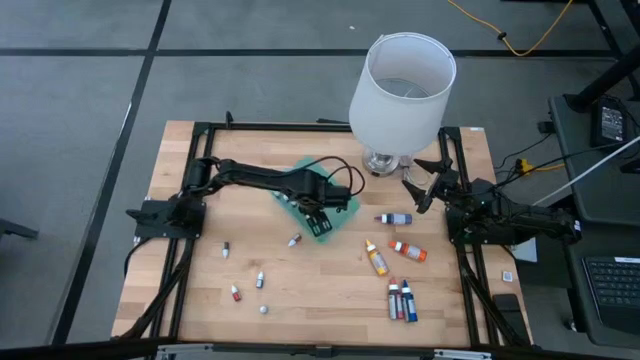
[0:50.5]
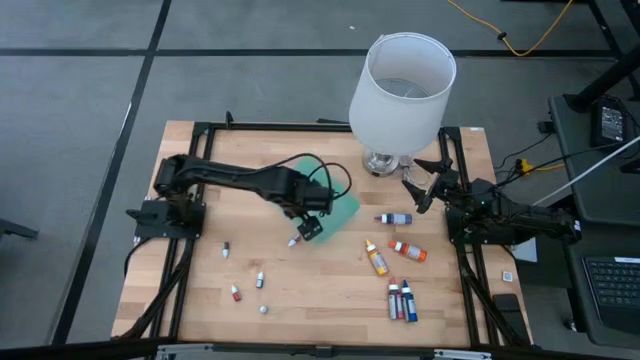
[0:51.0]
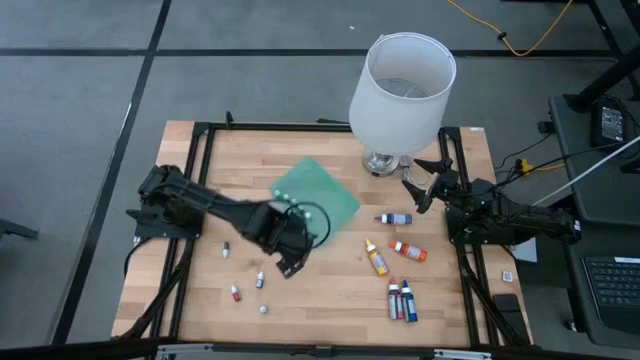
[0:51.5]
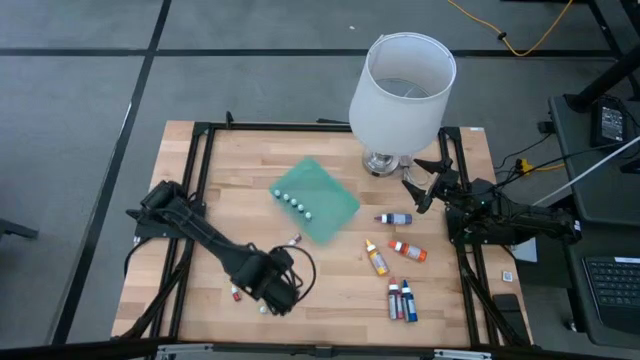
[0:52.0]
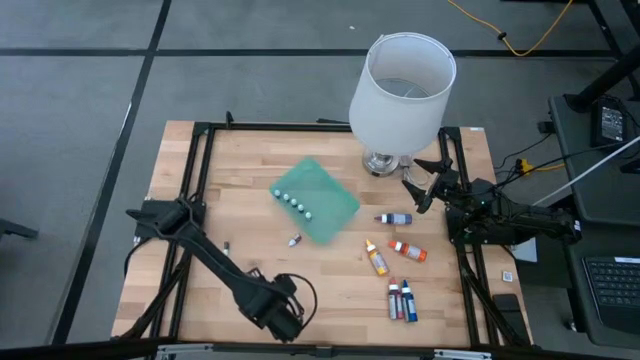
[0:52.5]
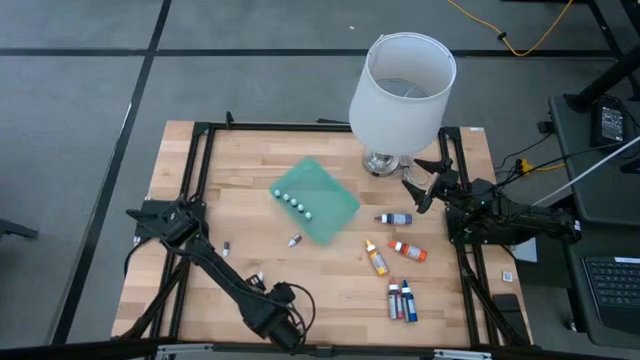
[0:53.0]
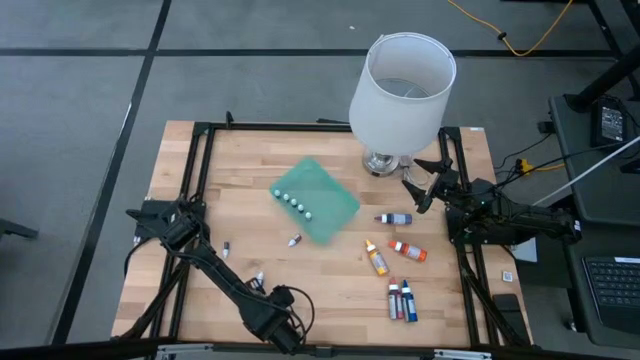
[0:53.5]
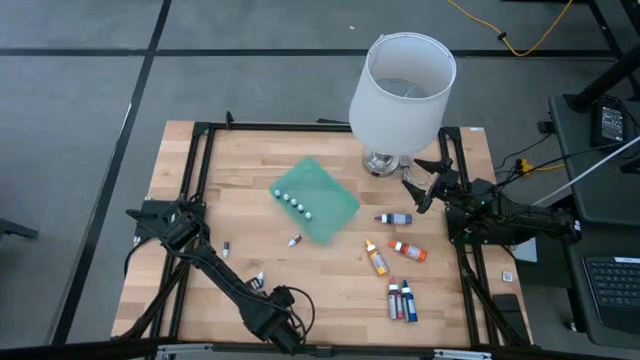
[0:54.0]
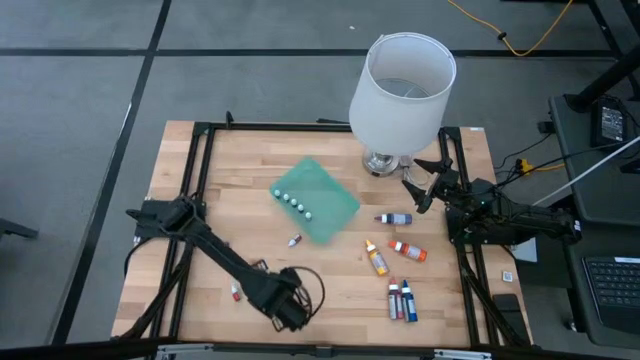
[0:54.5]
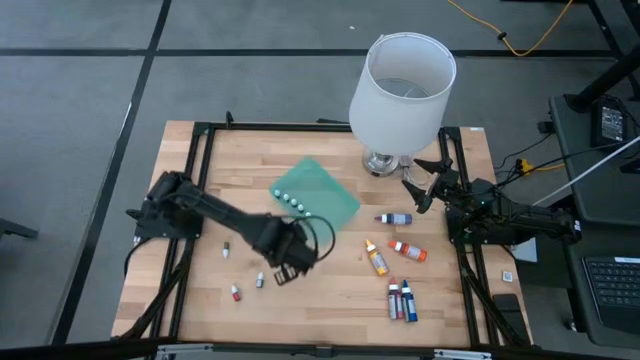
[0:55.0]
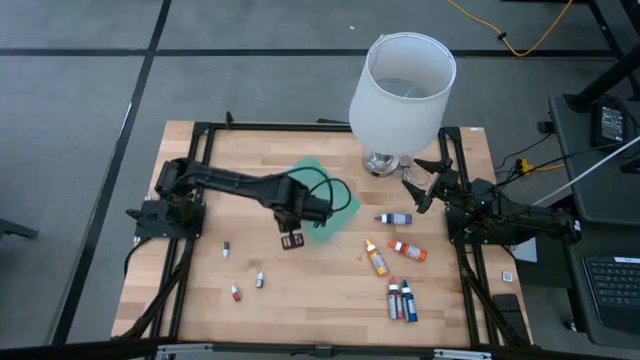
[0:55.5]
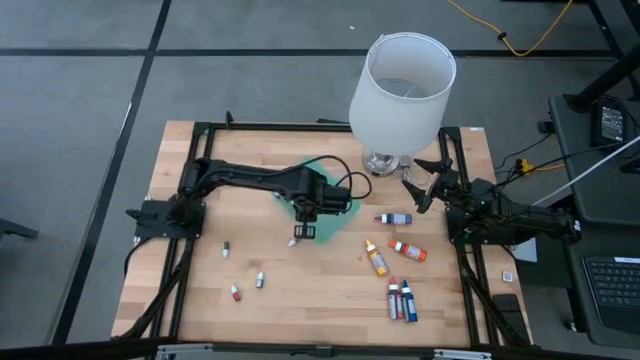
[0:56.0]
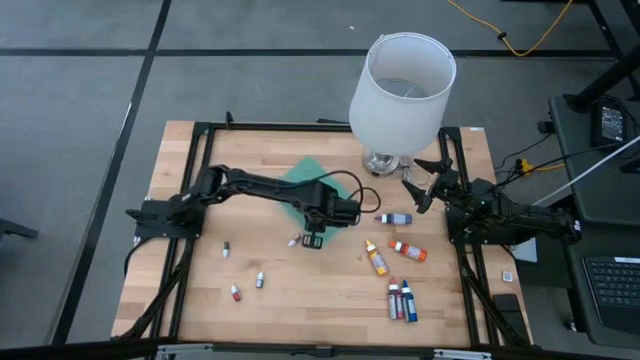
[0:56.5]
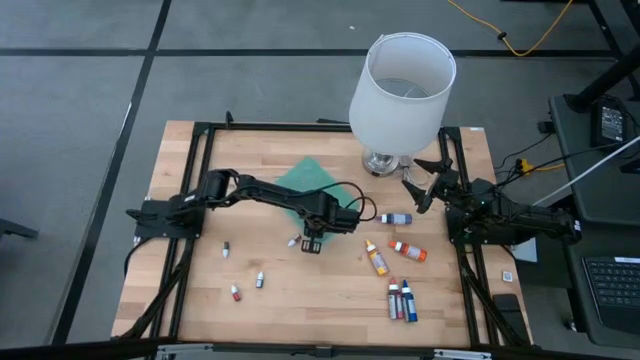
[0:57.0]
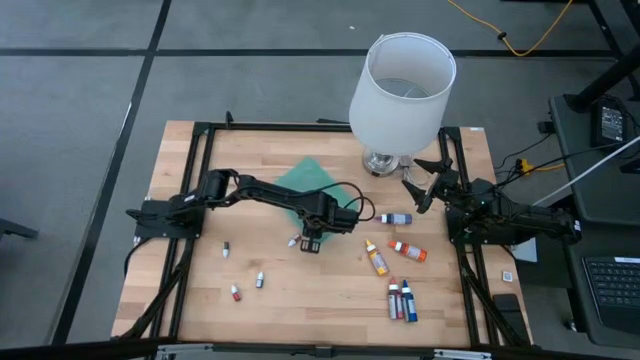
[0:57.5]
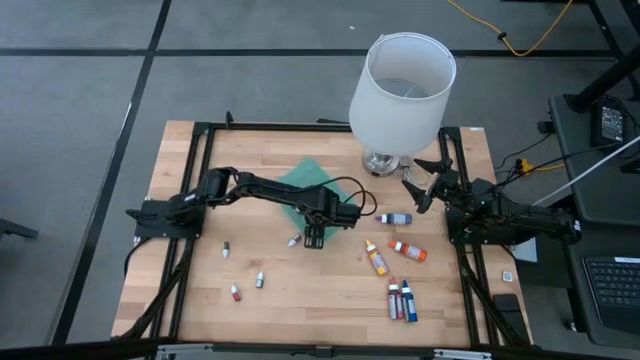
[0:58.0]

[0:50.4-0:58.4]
Task: Pick & Place food coloring
Put the small black food coloring bottle into the green bin

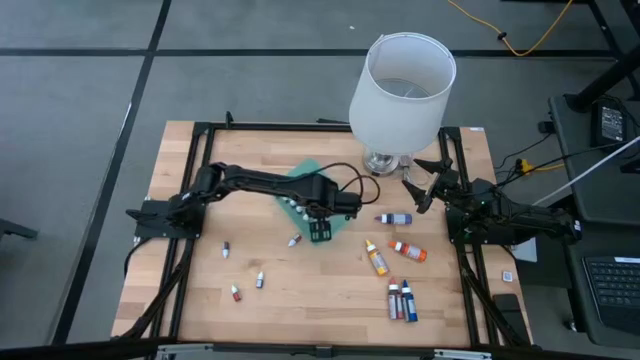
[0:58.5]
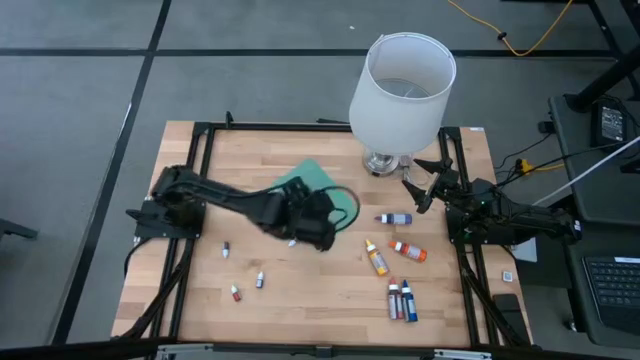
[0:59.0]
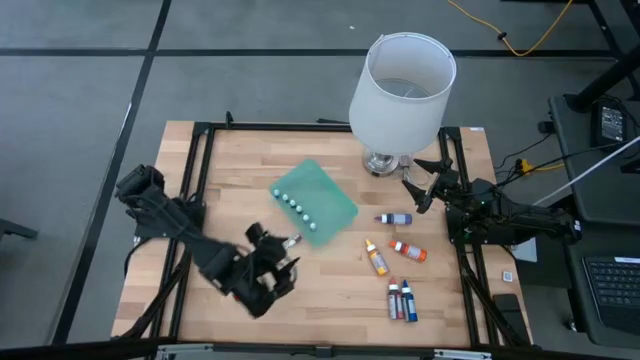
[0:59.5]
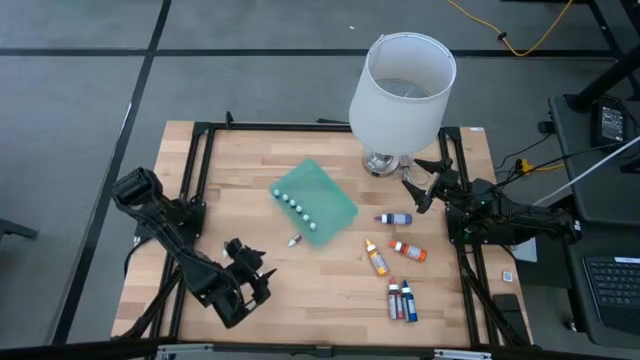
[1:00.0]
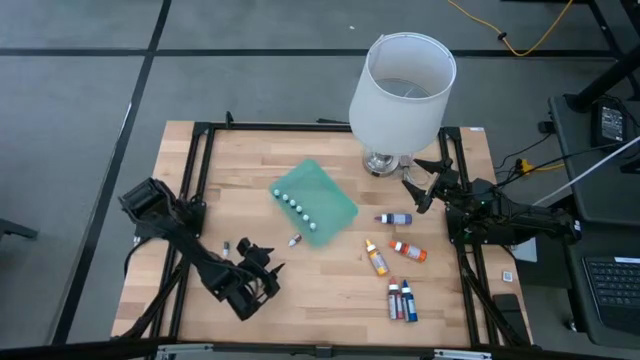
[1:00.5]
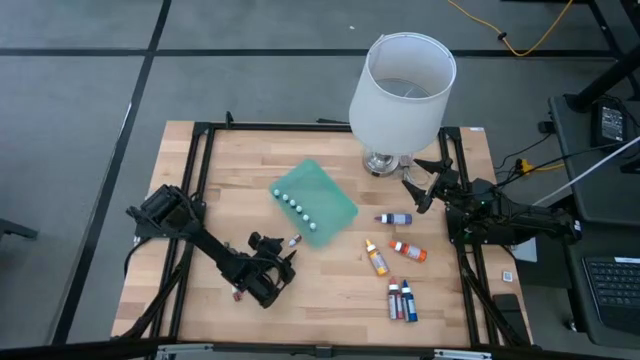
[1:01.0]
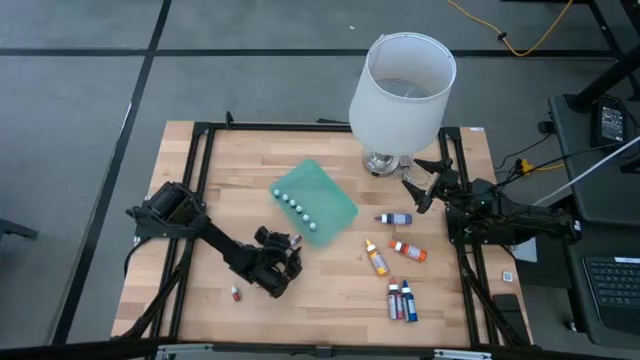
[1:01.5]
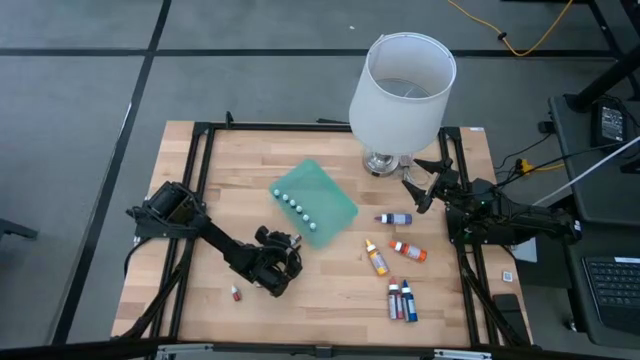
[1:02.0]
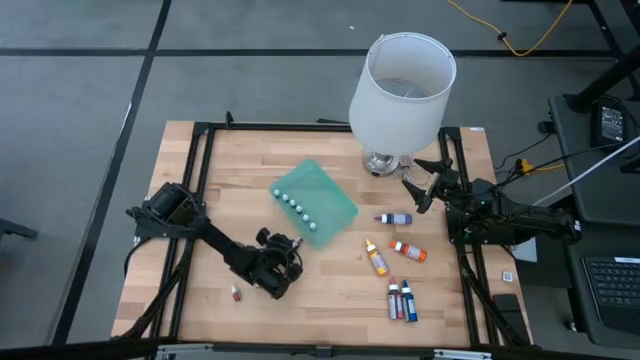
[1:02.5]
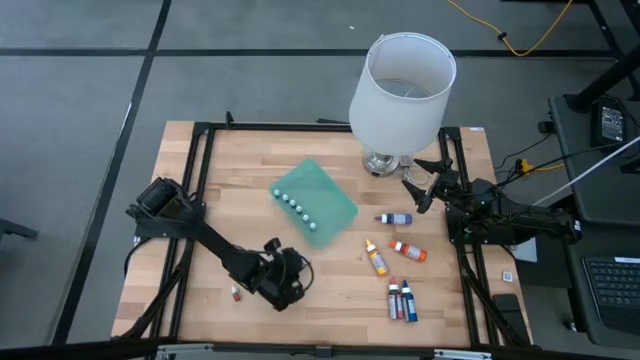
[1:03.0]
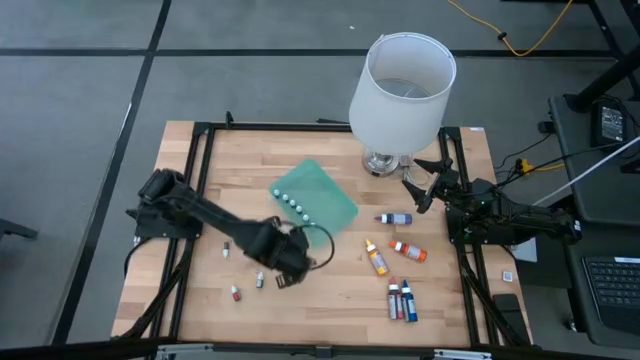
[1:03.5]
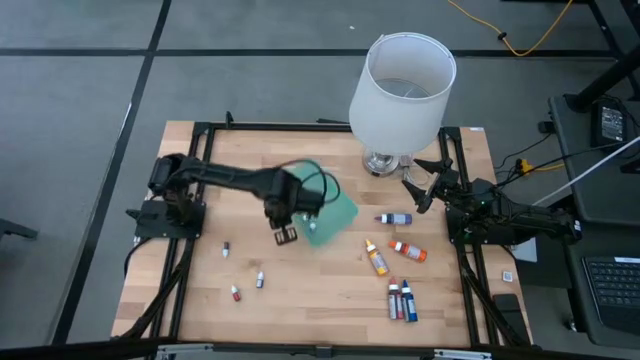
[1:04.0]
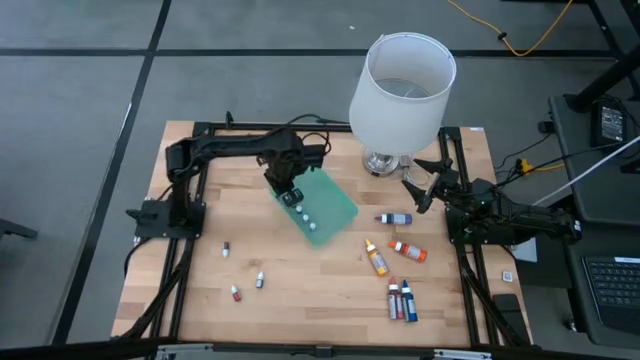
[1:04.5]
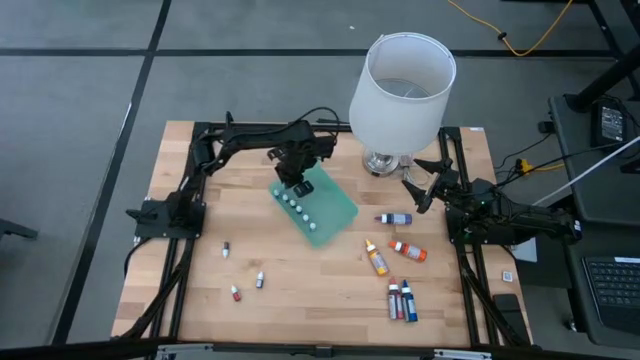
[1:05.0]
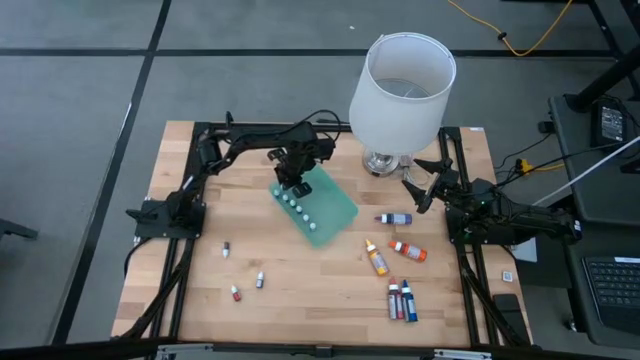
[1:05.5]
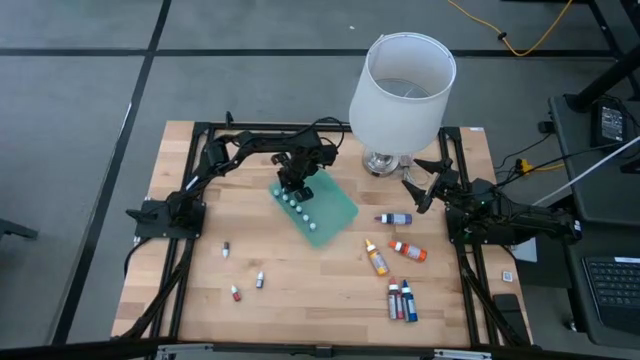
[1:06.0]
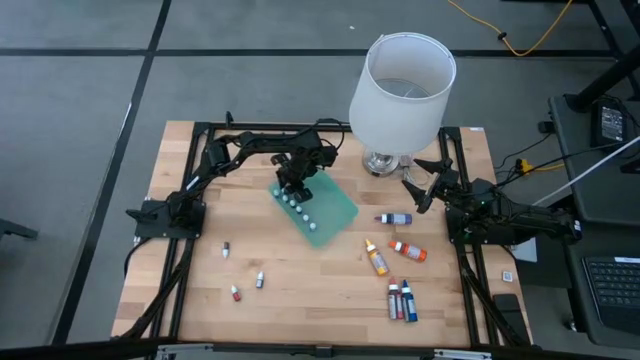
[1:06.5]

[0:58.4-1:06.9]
Put the top right small red food coloring bottle into the green bin

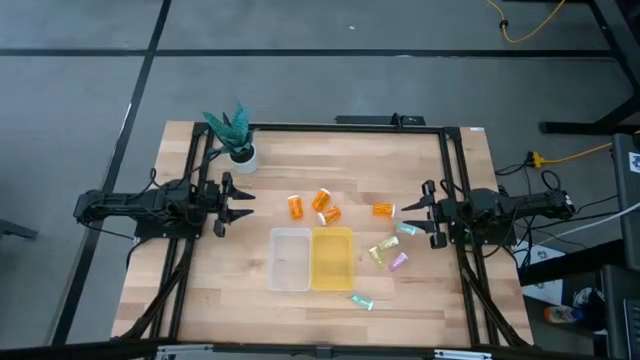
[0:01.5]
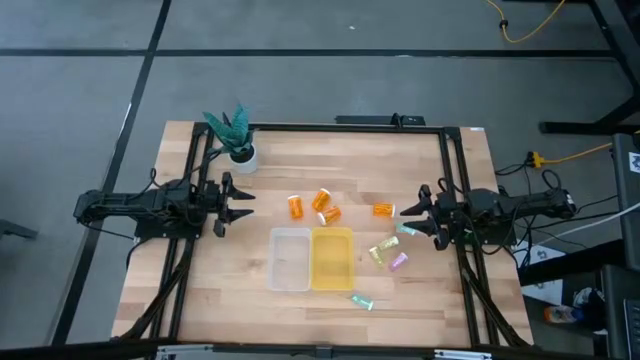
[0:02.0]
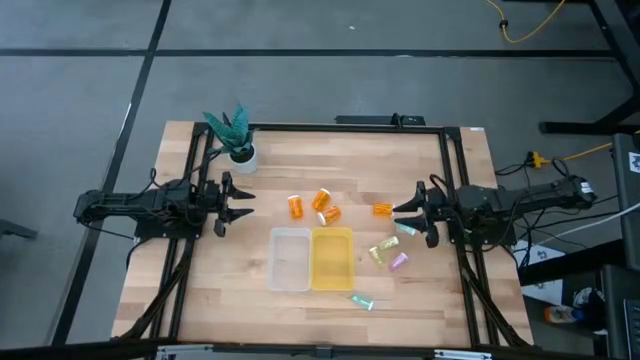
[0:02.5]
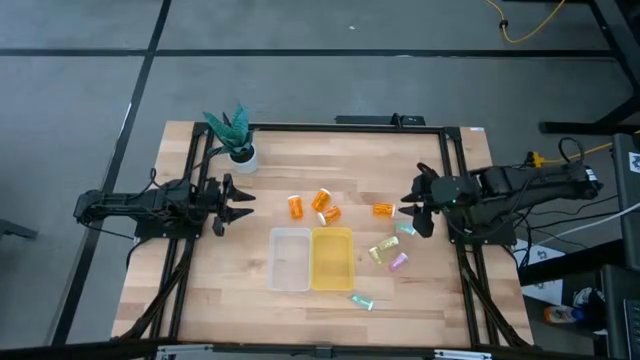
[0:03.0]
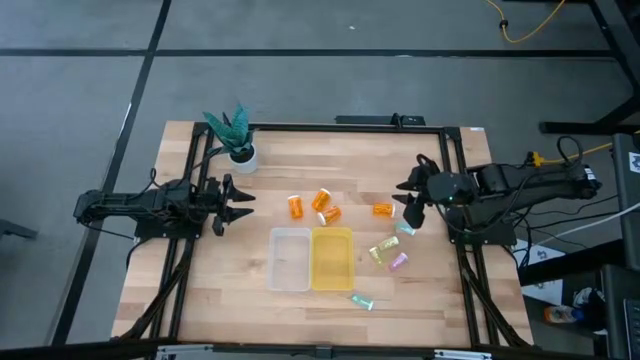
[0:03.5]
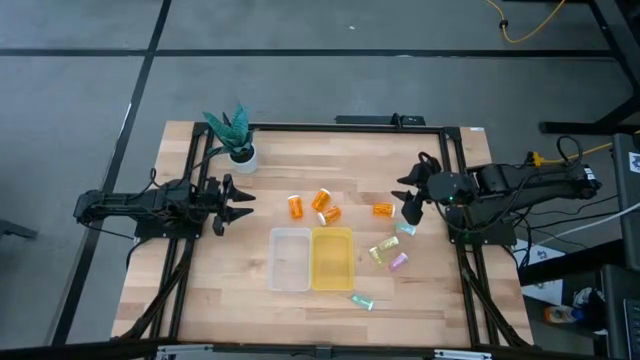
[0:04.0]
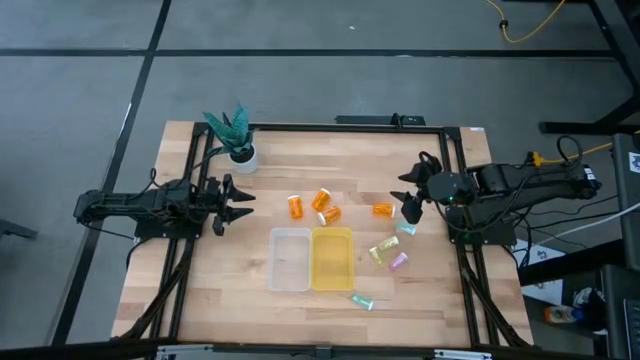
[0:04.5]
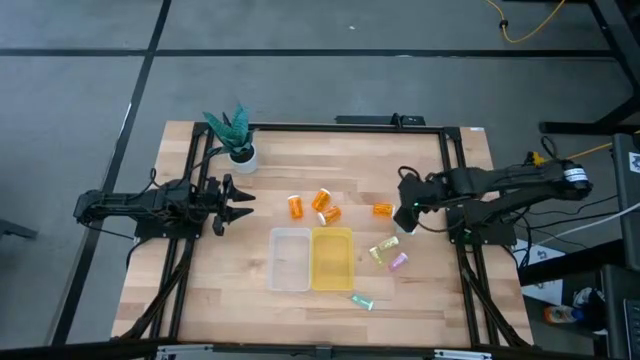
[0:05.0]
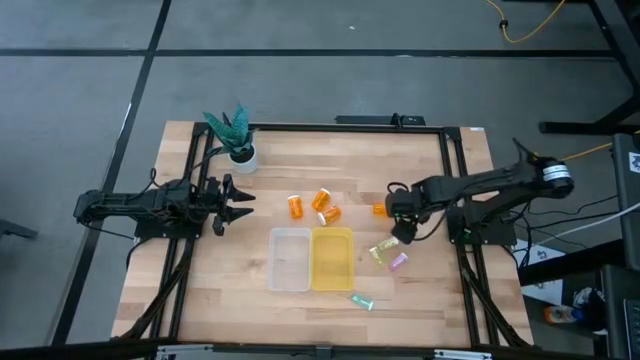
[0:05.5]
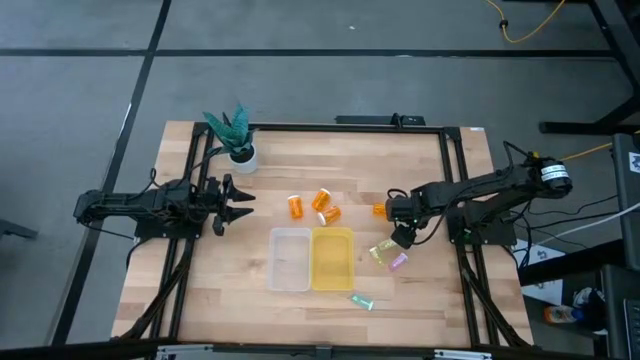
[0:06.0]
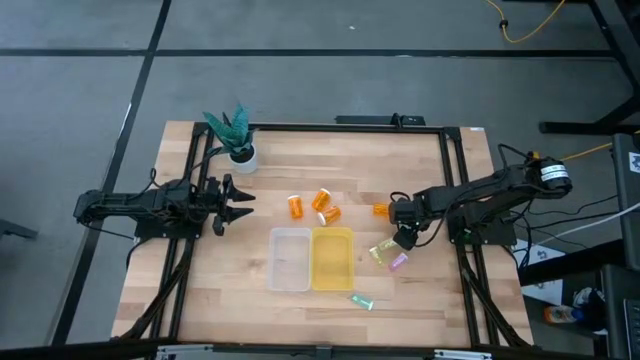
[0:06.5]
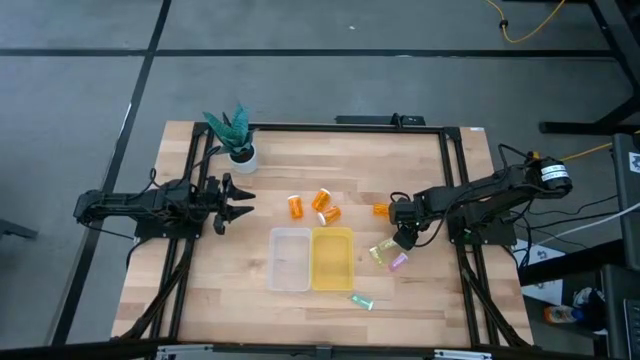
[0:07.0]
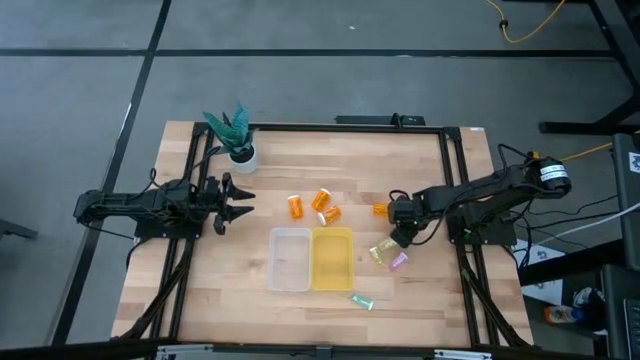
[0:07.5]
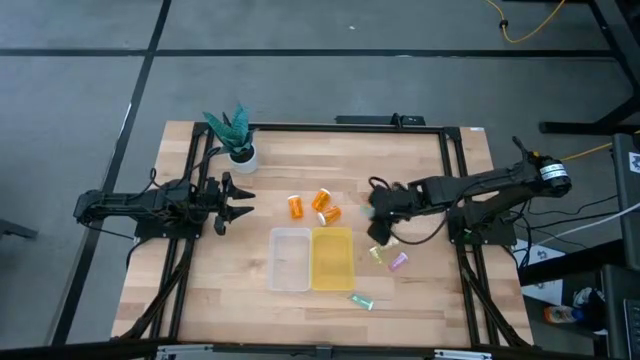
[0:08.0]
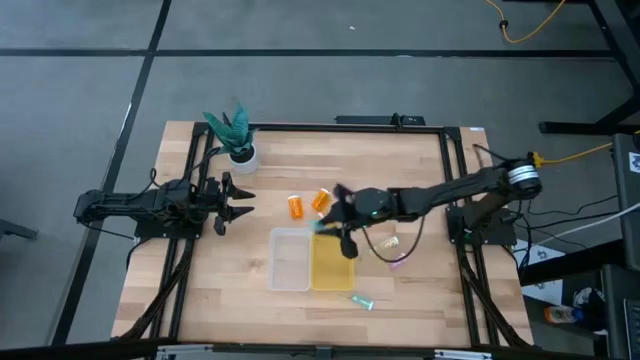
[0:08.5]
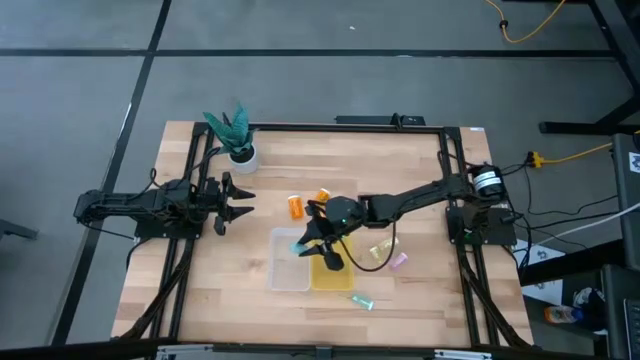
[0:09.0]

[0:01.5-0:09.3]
Task: Pick and place medicine bottles into bin by pill shape (circle, oval)
Put the blue tablet bottle into the transparent bin
